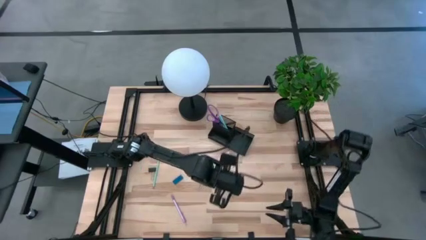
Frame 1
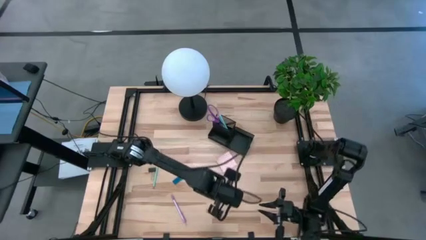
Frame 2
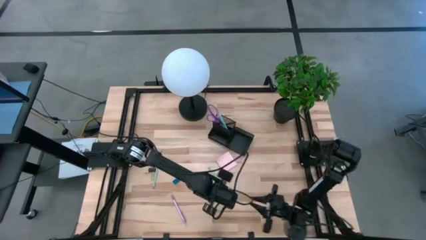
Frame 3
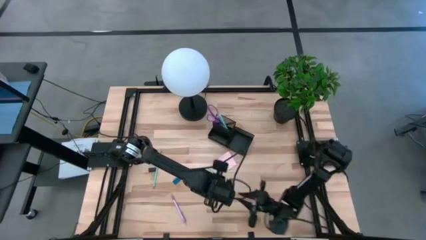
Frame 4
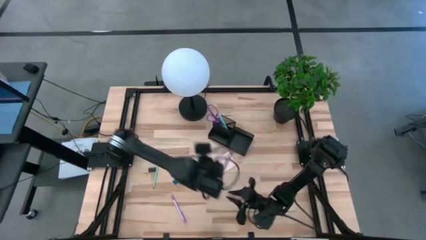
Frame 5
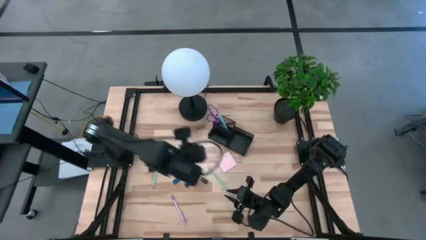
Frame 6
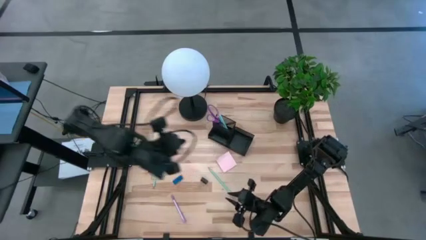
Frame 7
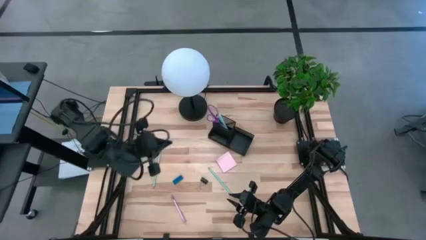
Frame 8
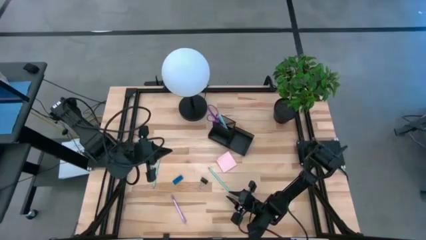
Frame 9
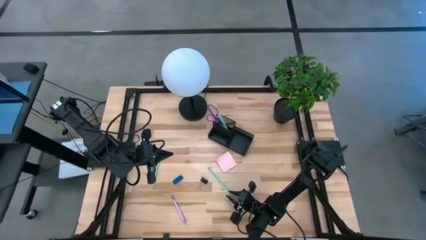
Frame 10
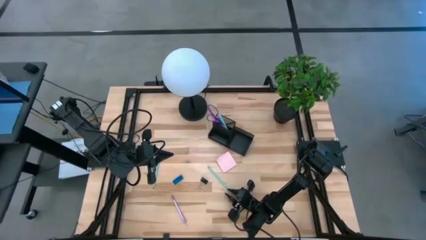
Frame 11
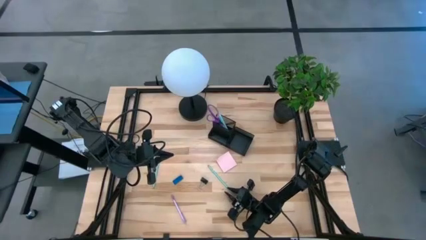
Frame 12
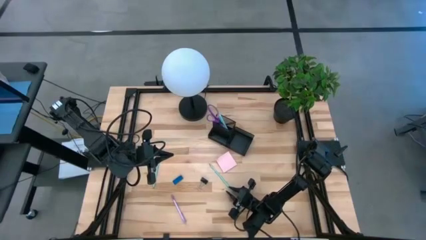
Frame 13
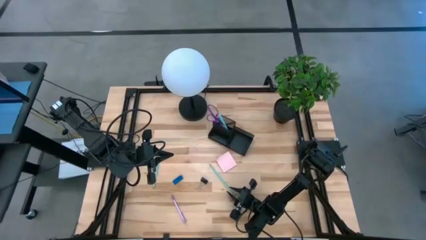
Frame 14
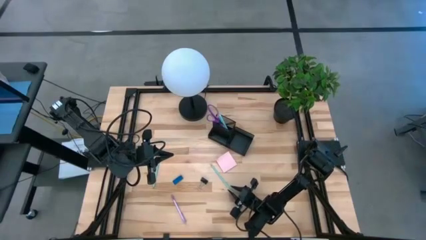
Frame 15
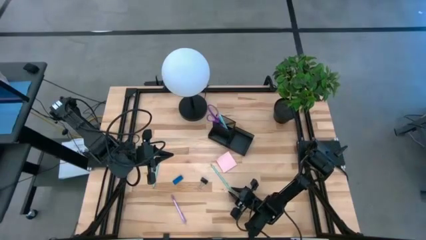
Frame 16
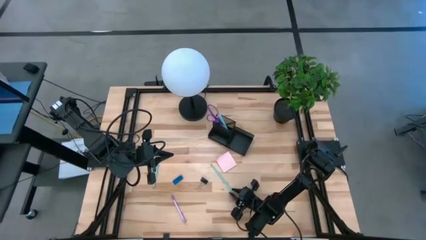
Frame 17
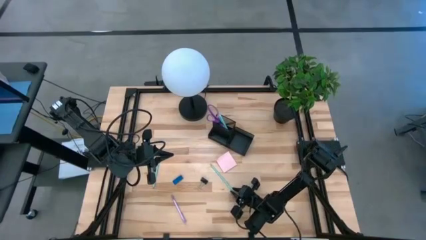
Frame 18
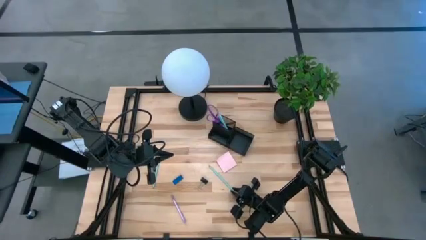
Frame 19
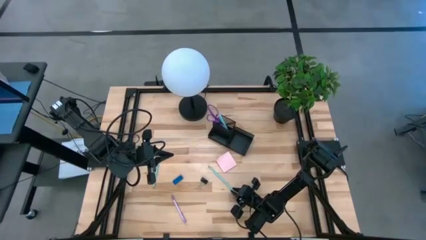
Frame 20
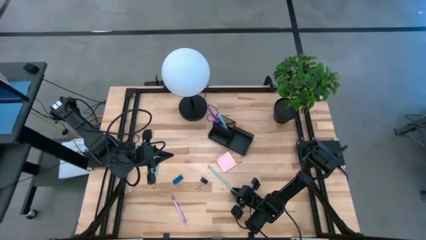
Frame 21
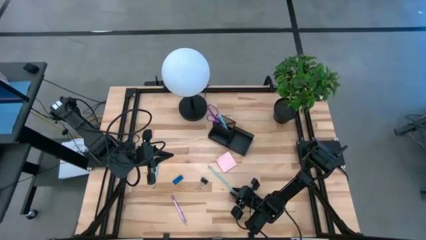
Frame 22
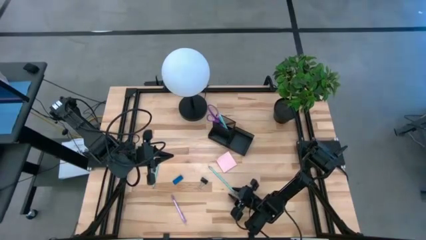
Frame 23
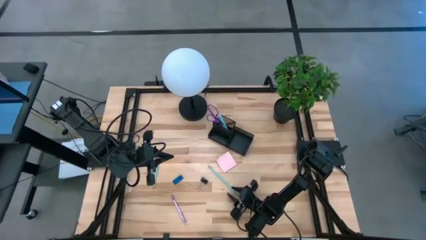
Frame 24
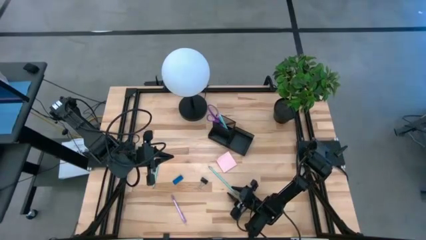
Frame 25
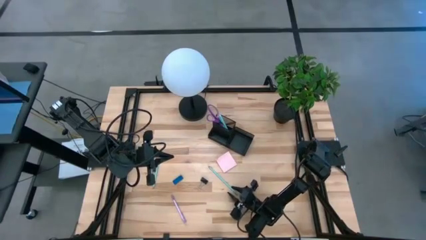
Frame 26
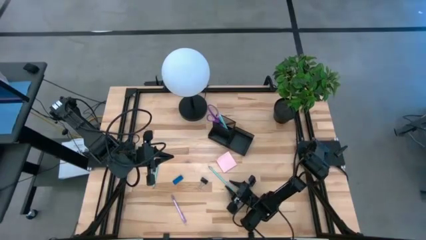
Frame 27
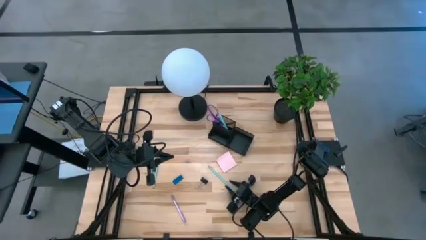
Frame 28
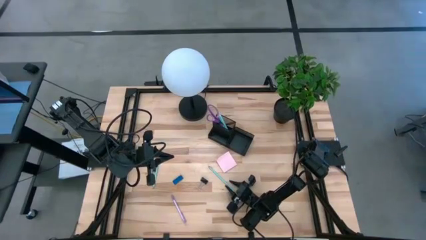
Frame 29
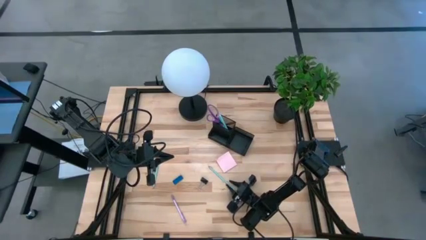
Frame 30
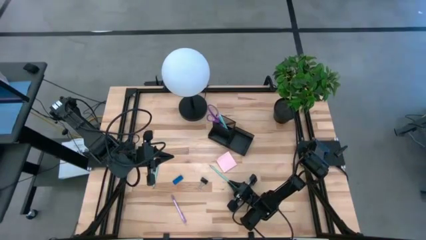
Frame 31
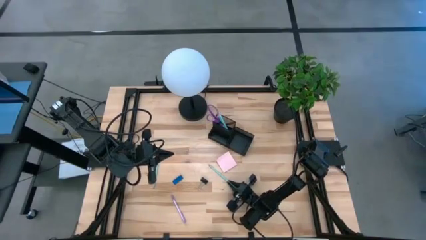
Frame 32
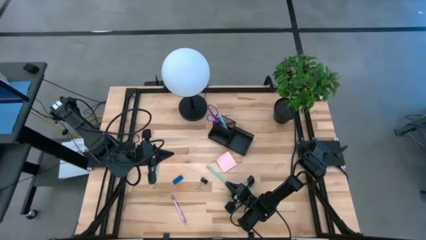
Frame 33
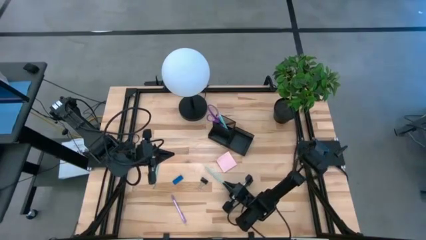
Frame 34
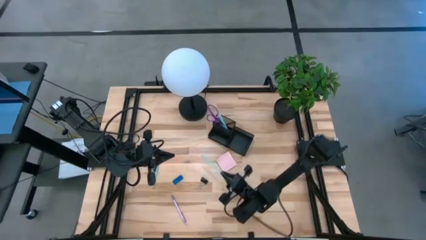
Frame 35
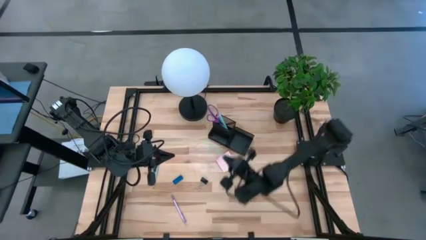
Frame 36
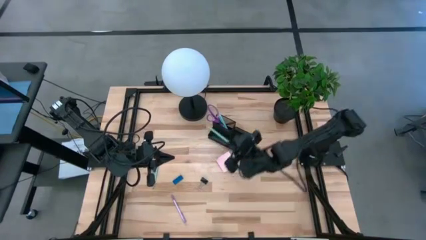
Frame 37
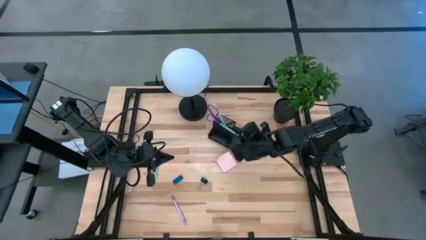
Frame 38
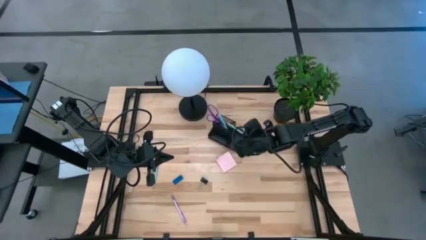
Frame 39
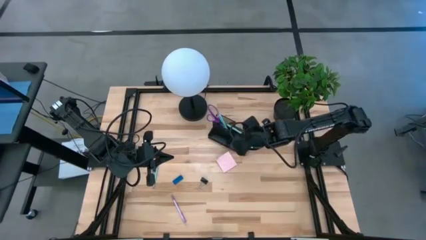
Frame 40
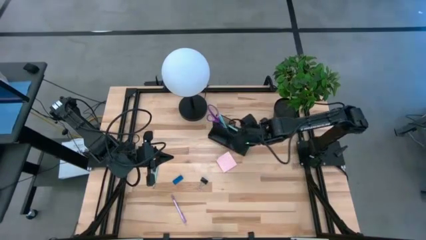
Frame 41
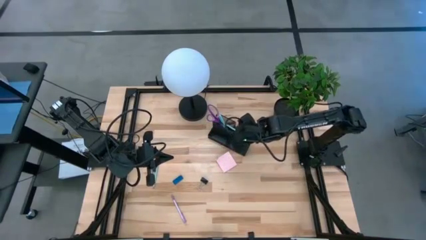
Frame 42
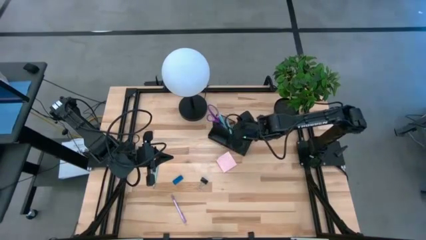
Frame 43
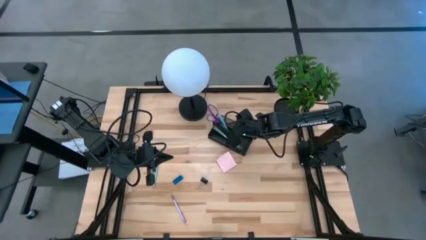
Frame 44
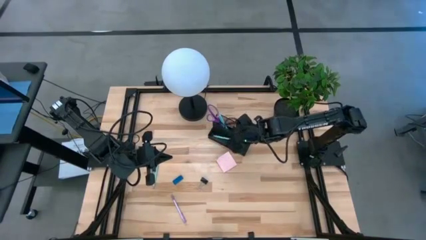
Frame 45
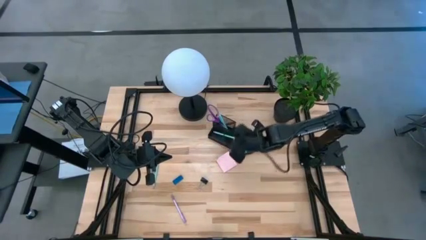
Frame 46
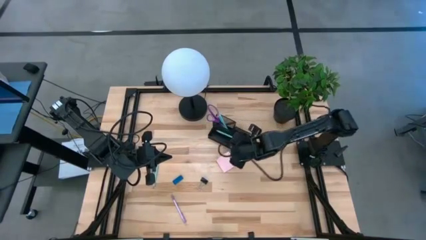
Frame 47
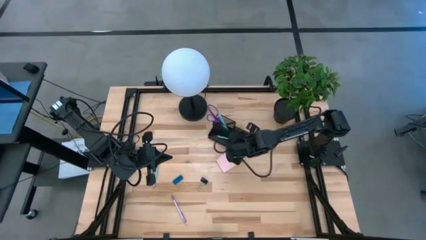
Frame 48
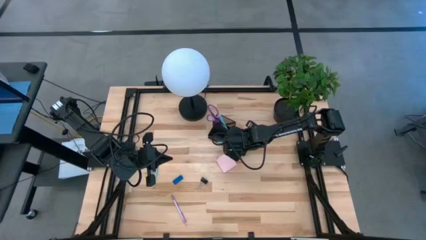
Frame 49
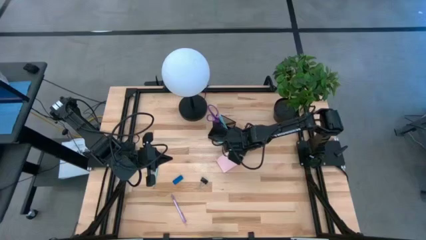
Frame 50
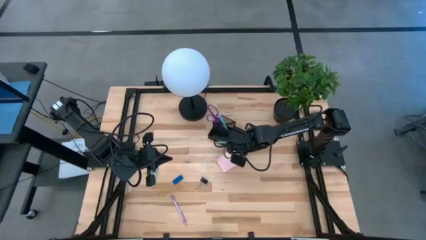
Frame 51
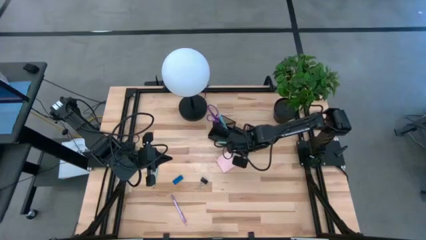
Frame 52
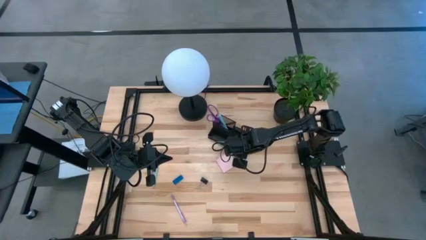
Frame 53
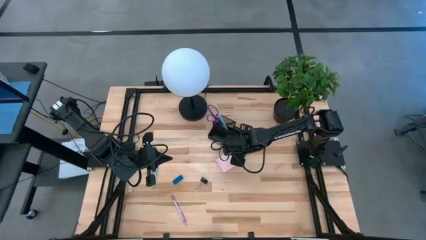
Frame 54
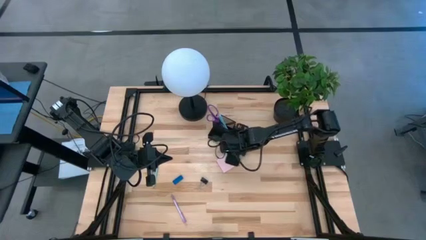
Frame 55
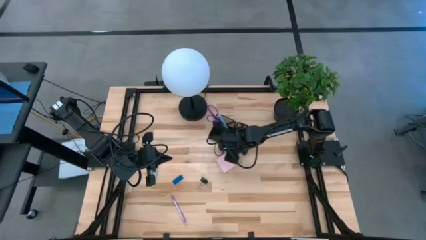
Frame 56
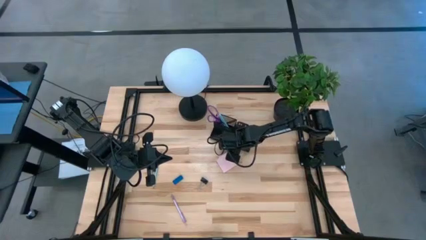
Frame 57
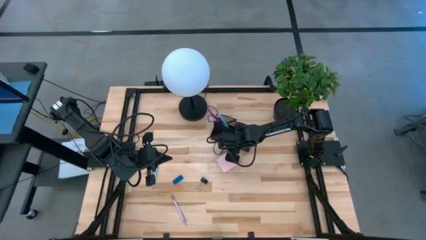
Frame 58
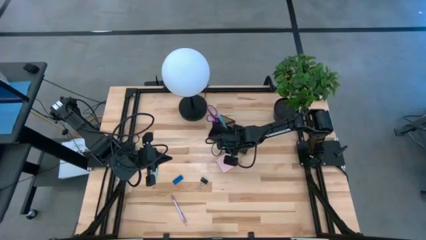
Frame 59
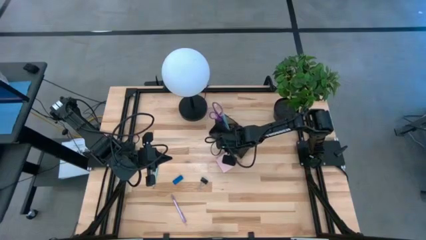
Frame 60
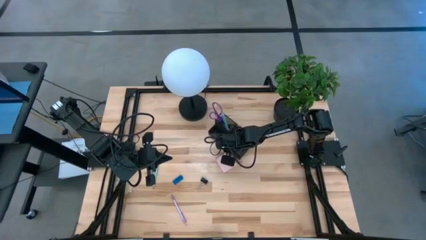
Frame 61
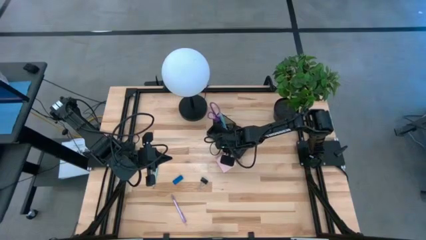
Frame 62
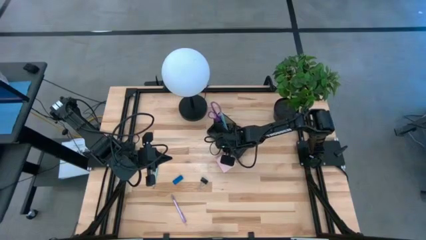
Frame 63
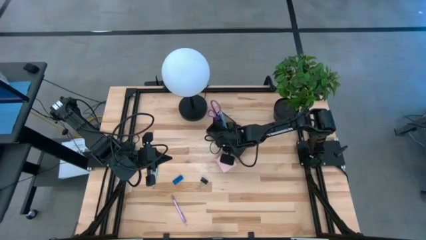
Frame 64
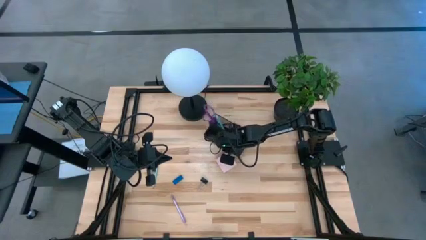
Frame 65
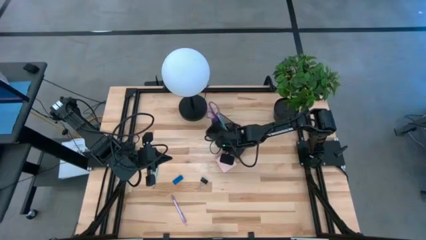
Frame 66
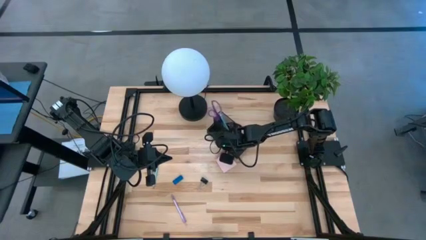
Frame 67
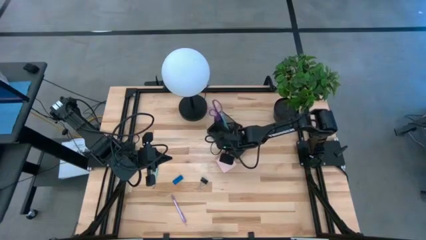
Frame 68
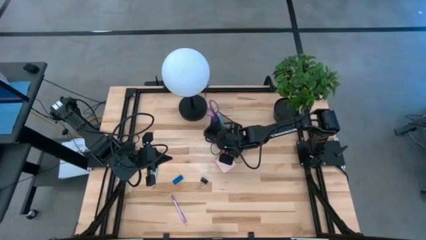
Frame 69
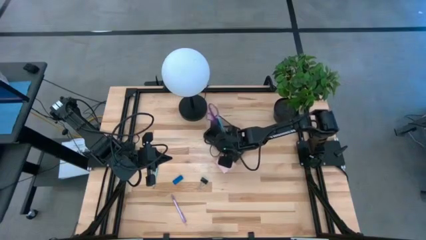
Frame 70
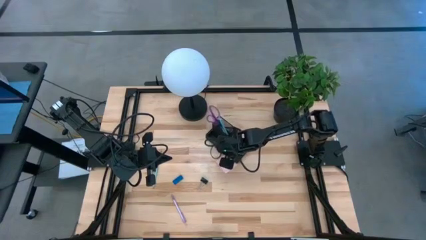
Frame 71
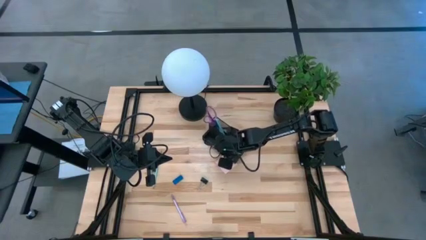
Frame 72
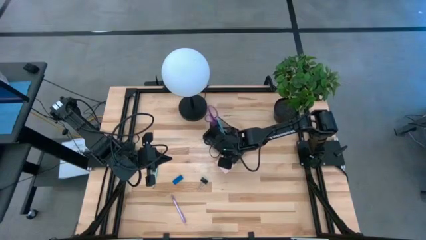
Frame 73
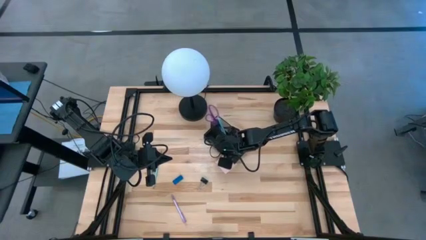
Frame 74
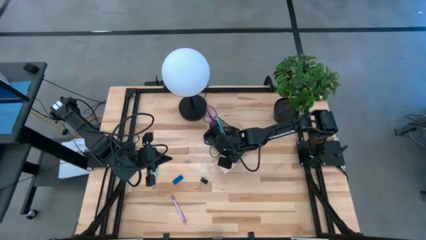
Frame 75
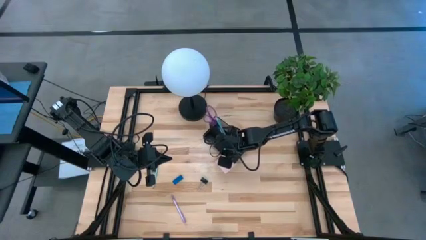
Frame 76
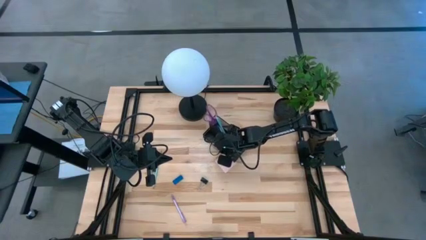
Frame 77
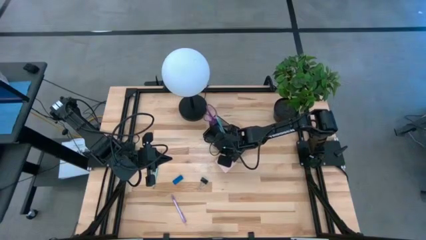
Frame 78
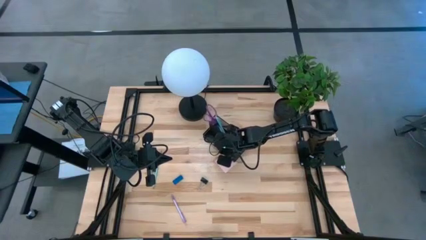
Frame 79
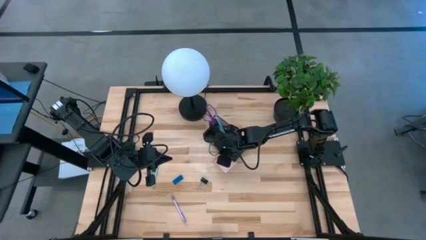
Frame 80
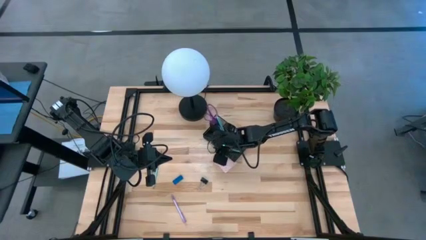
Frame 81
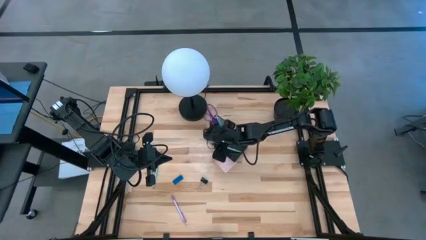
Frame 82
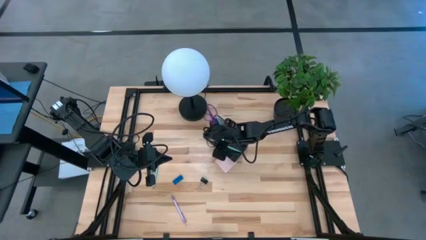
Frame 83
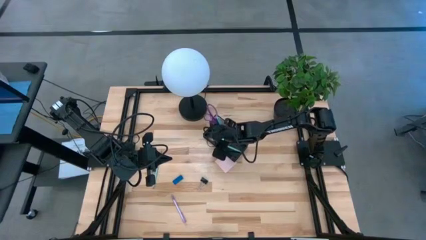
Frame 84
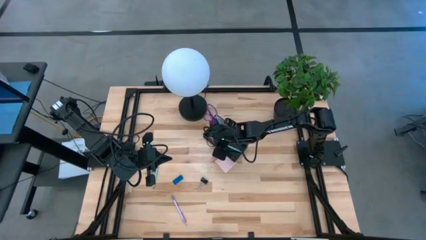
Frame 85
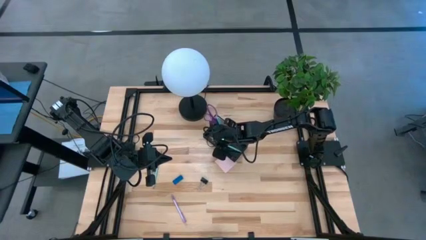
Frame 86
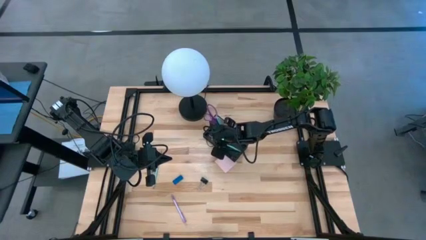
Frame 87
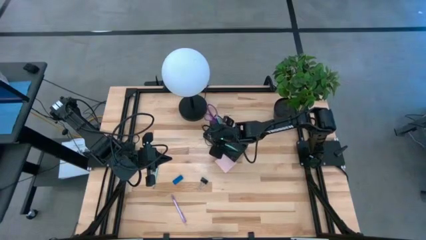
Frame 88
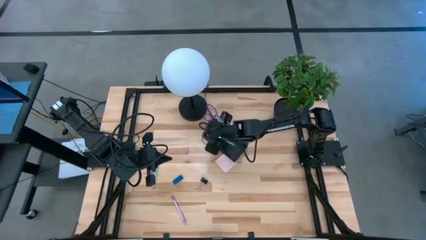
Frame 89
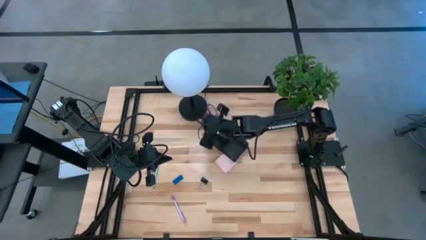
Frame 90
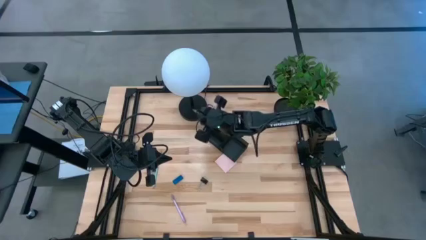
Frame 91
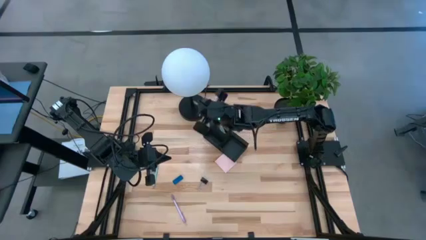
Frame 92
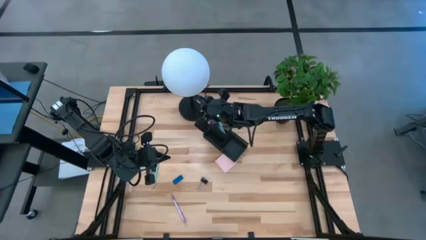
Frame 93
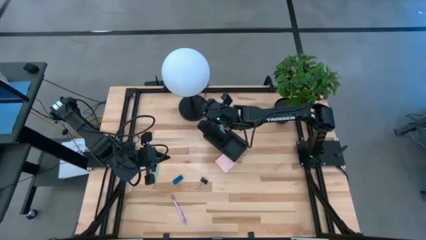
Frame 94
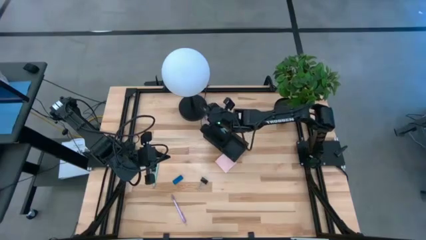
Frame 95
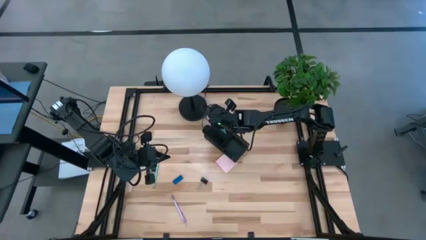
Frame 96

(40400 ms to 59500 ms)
Task: Pick and place office supplies into organizer
Put the right blue pencil into the desk organizer
